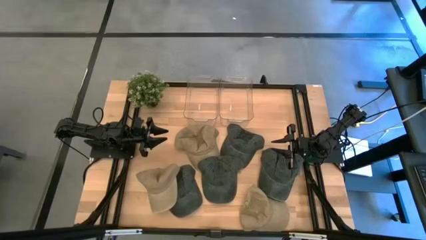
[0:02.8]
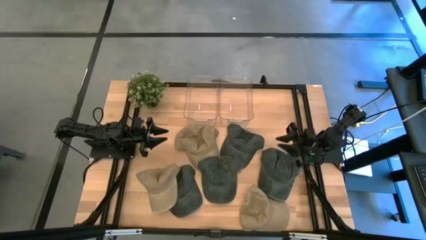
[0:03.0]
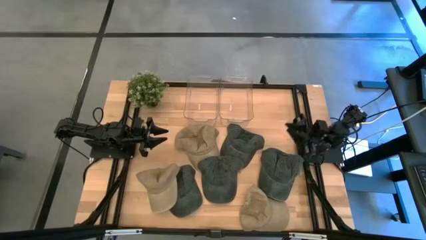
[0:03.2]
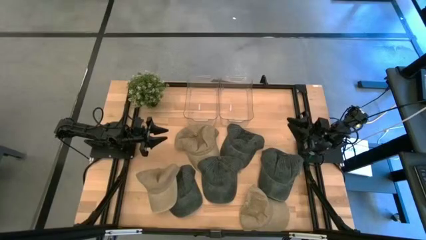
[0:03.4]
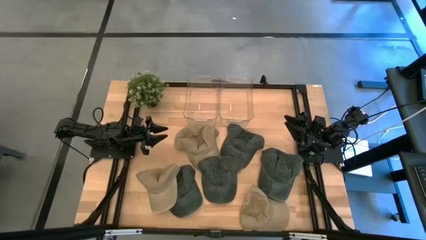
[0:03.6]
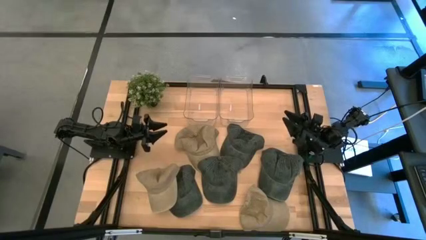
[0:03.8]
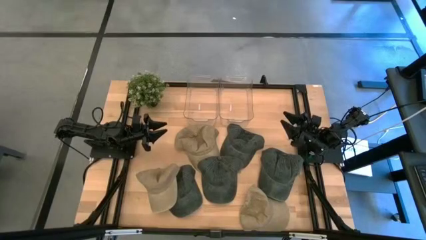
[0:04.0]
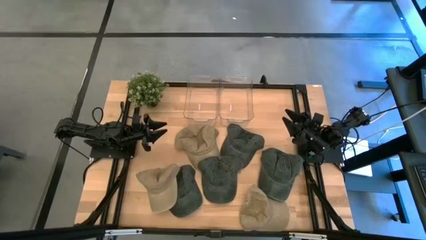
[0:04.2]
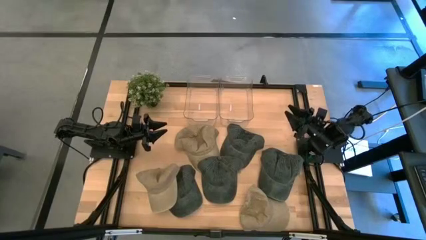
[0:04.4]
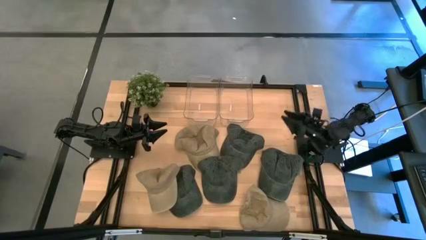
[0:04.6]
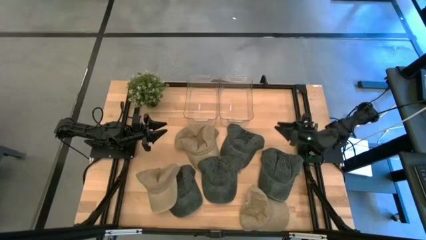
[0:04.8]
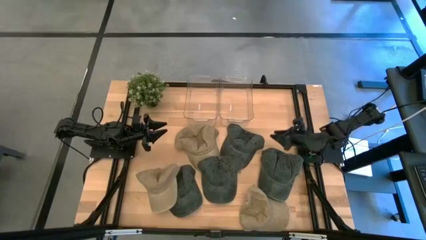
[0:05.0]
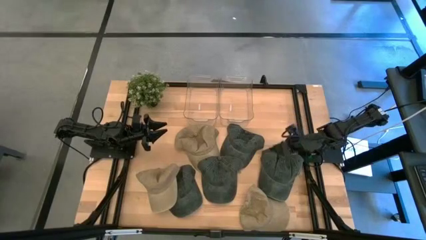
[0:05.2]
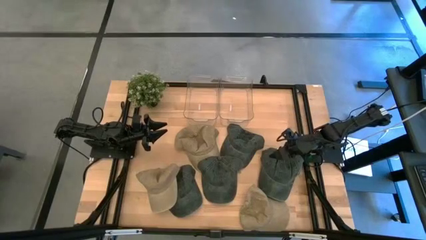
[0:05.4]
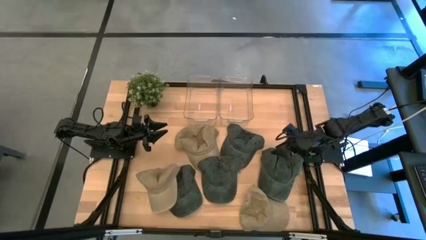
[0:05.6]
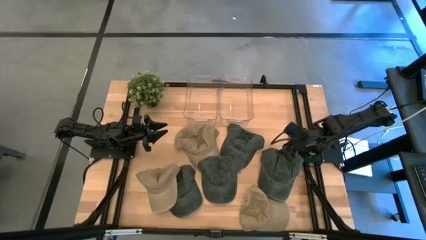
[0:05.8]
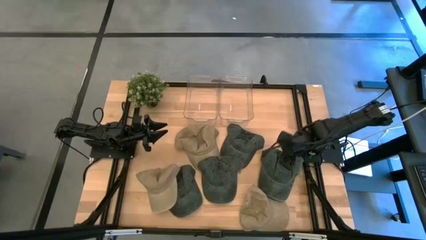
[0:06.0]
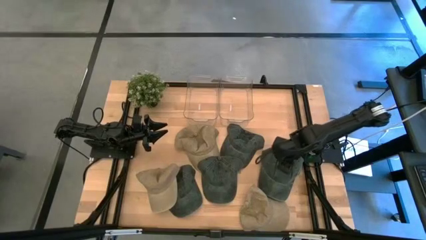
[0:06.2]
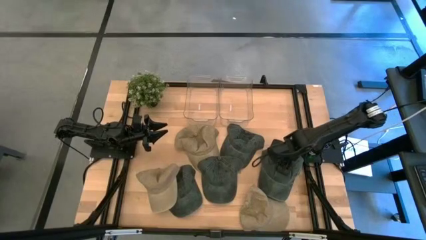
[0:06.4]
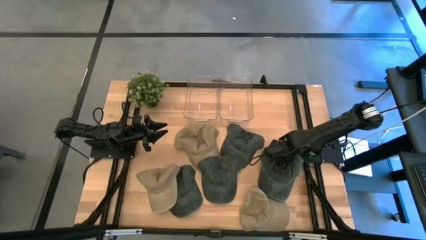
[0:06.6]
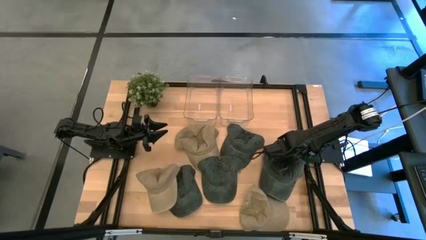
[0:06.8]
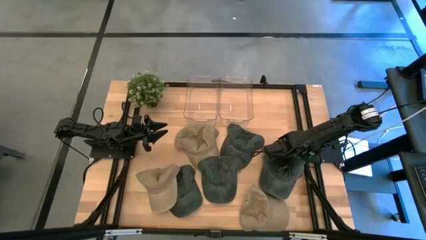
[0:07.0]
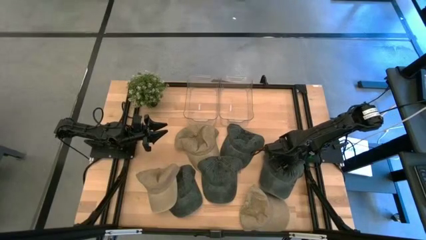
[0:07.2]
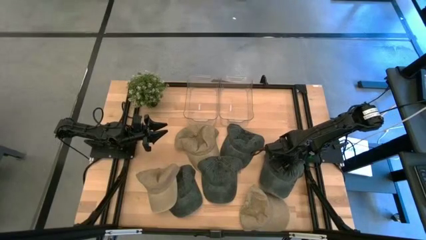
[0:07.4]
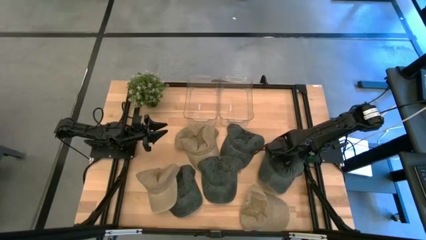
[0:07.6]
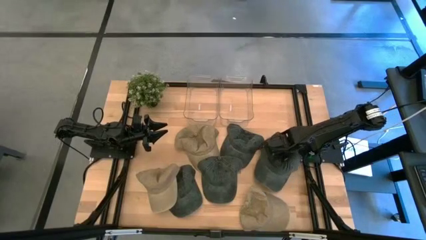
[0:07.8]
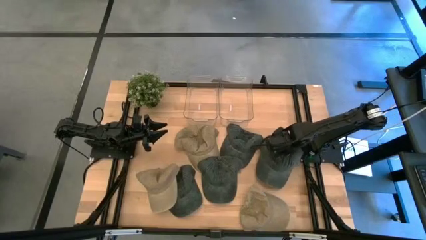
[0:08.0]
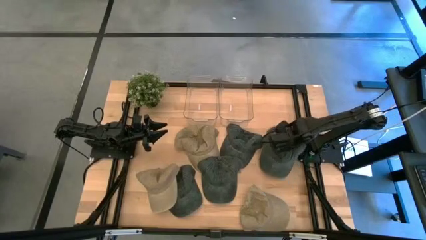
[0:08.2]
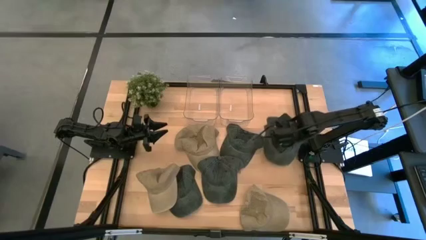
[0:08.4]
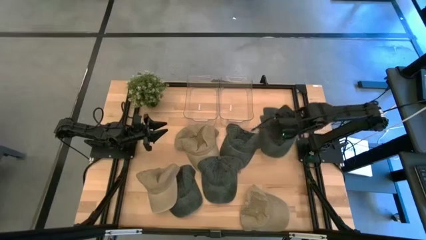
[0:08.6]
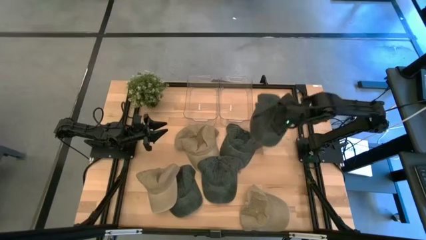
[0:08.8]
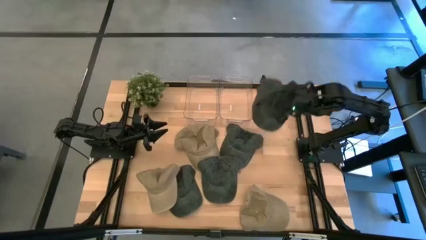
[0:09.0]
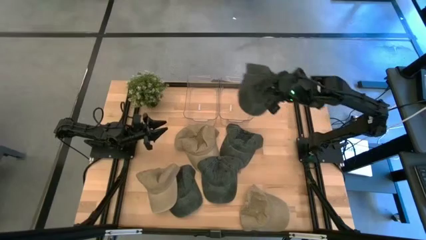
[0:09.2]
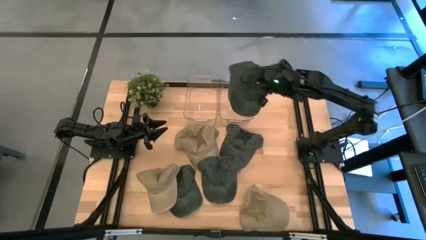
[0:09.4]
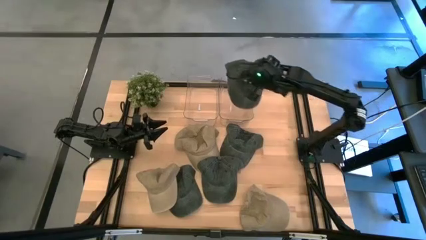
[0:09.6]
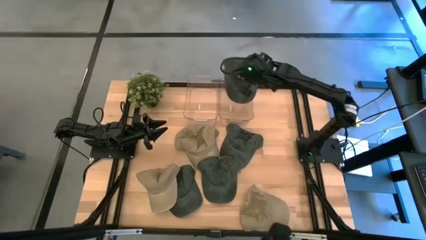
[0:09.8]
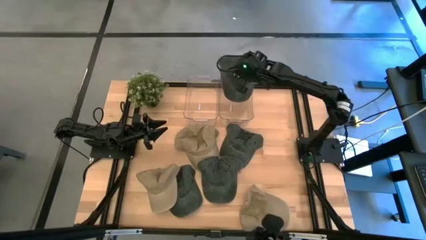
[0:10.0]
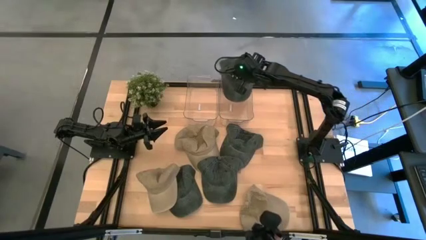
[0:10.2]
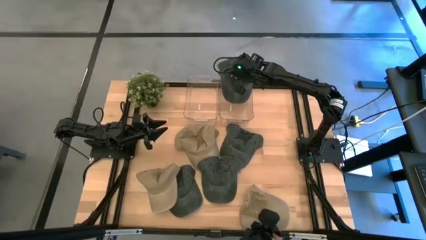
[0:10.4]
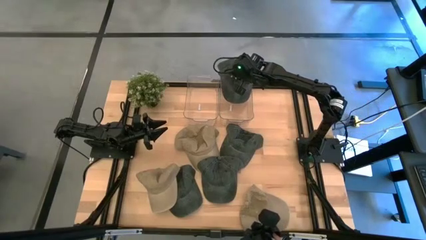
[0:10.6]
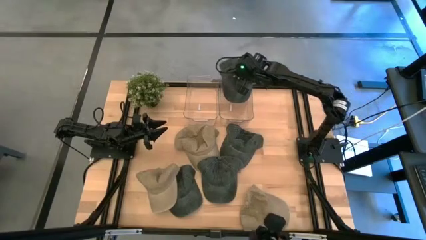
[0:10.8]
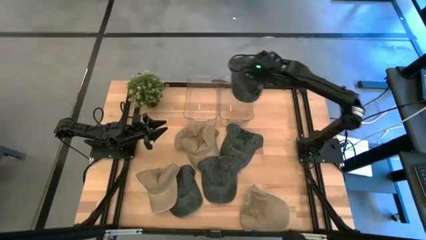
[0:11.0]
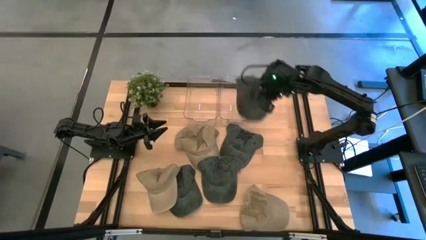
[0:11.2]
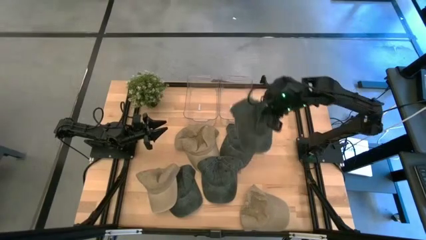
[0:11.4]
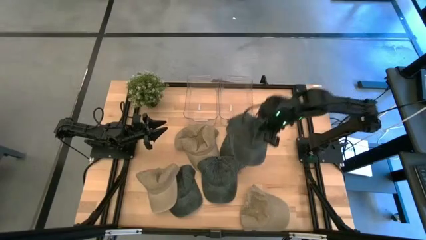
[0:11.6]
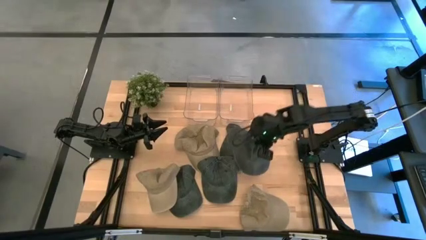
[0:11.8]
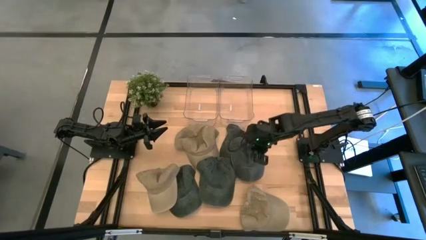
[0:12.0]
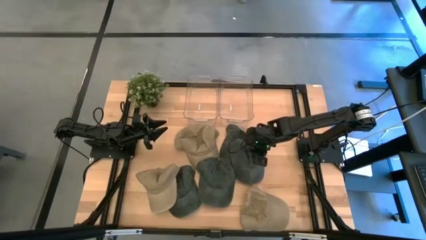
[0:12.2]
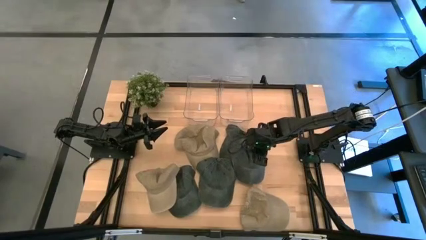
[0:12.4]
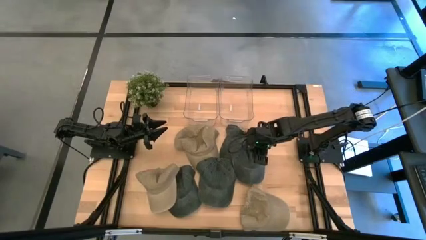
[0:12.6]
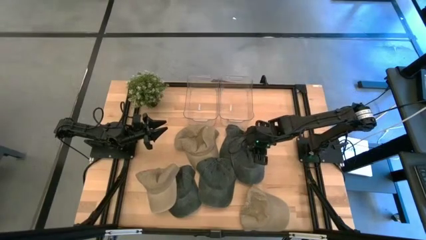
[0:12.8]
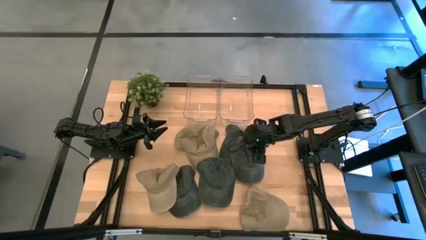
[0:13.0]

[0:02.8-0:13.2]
Task: Pick & Place hat
Put the black cap into the right transparent bin

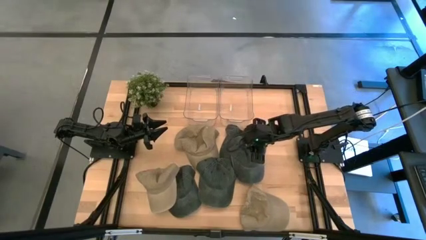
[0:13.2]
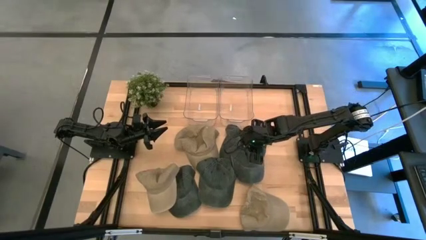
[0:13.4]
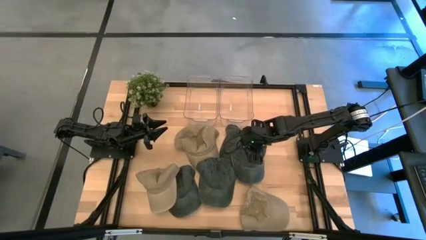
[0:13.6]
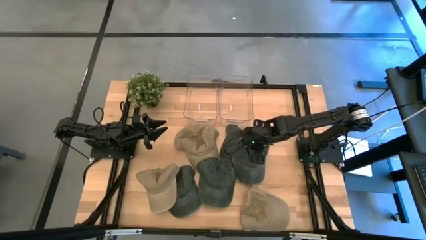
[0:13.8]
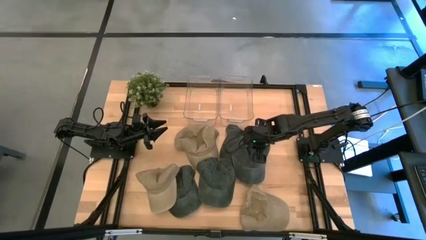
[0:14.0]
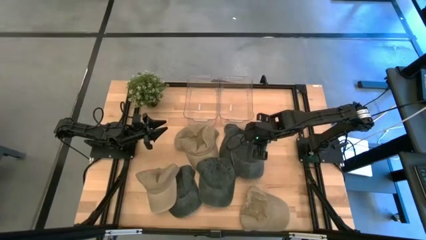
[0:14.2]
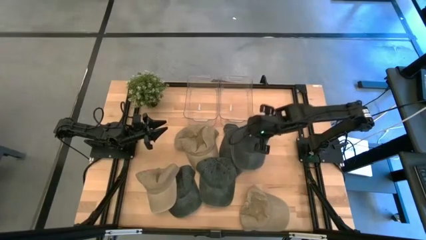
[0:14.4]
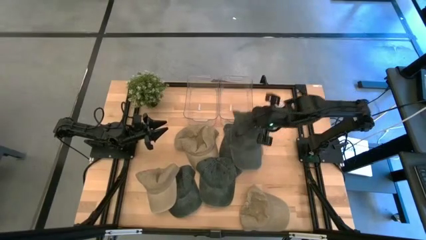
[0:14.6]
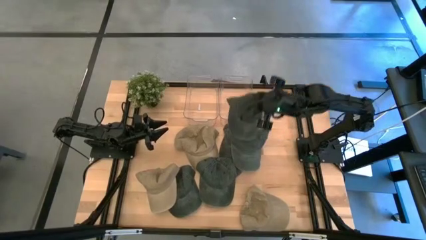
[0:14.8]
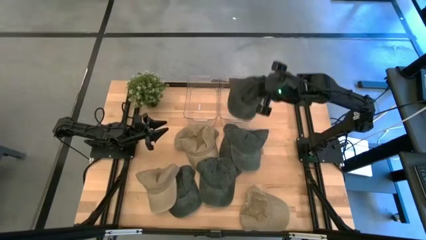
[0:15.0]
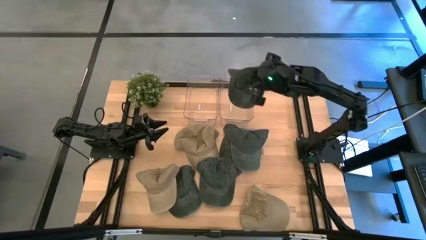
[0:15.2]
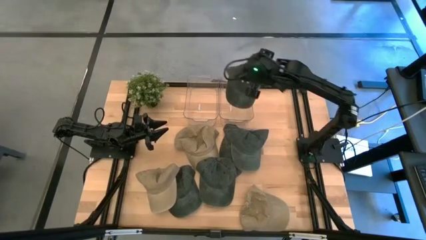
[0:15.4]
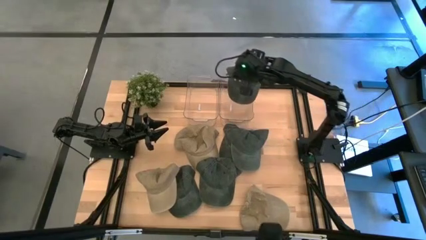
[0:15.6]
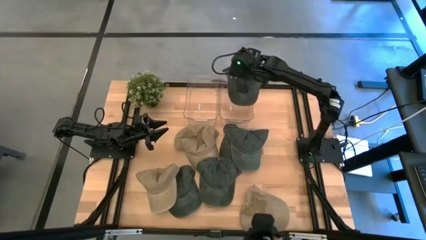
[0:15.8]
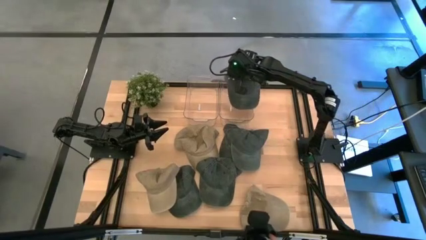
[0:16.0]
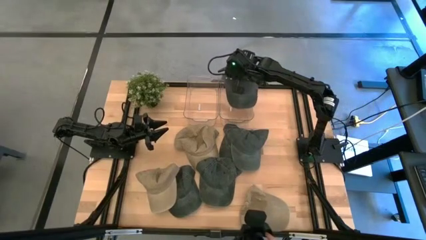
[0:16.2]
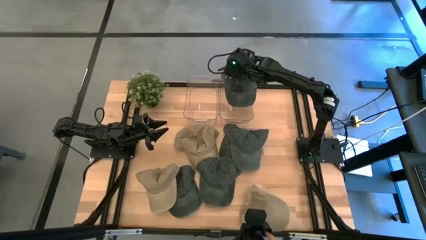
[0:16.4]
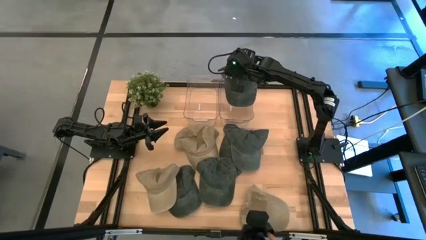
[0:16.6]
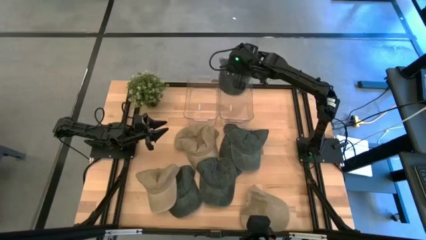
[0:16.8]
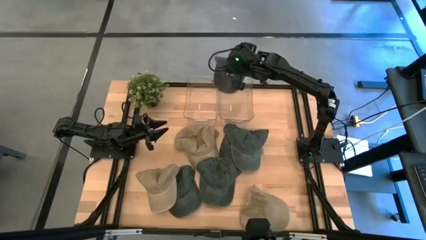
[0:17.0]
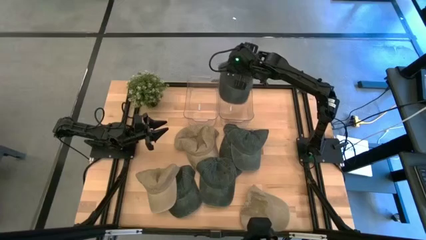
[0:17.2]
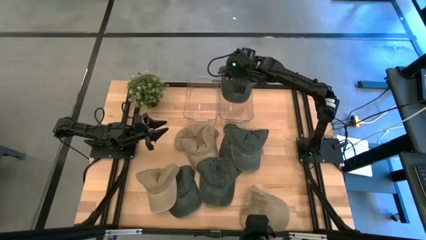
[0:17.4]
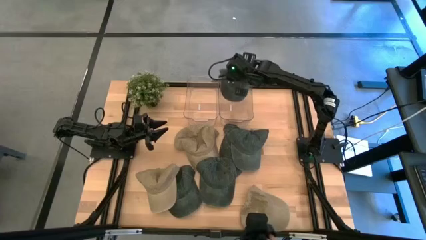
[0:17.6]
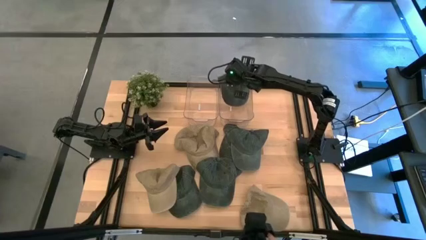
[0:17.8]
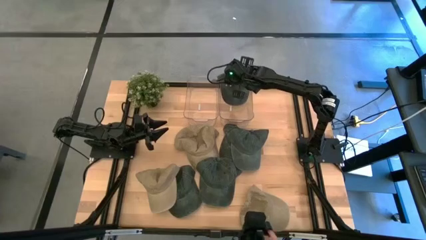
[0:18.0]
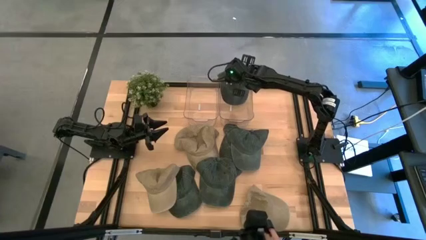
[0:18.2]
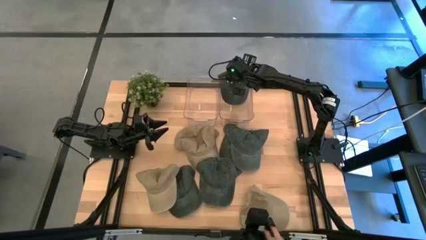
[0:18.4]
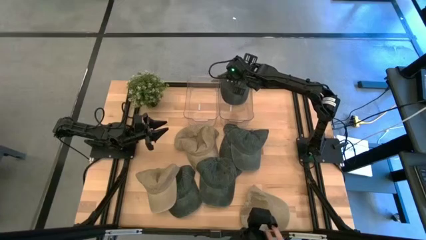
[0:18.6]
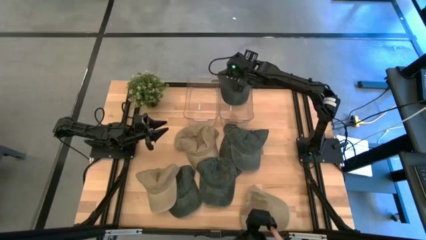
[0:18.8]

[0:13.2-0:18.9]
Put the black cap into the right transparent bin
